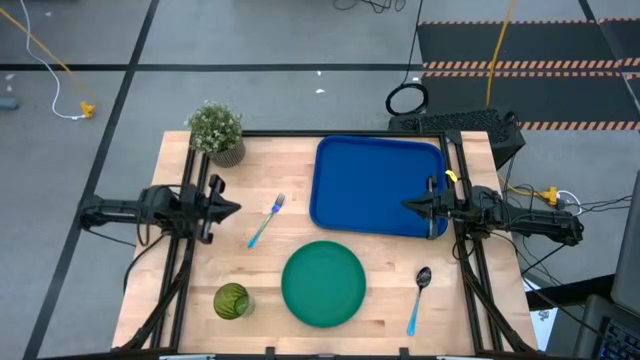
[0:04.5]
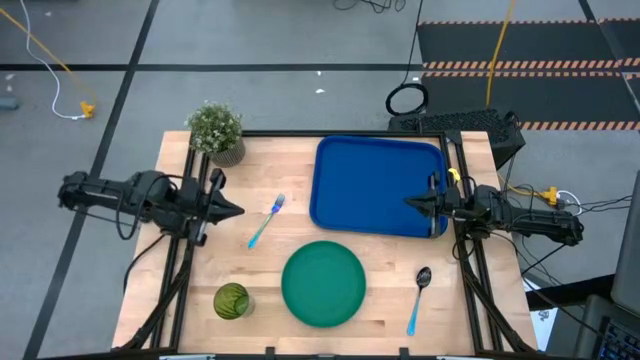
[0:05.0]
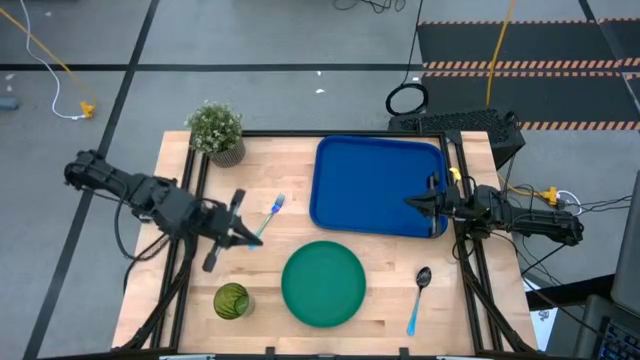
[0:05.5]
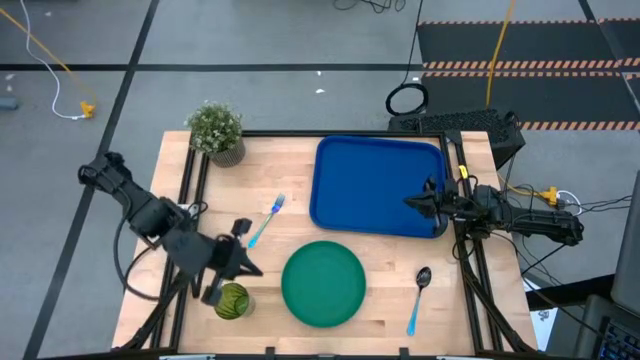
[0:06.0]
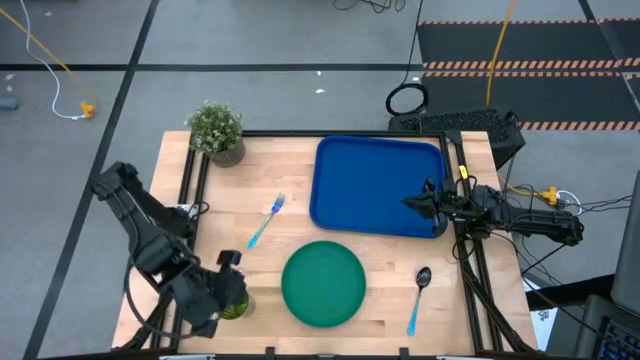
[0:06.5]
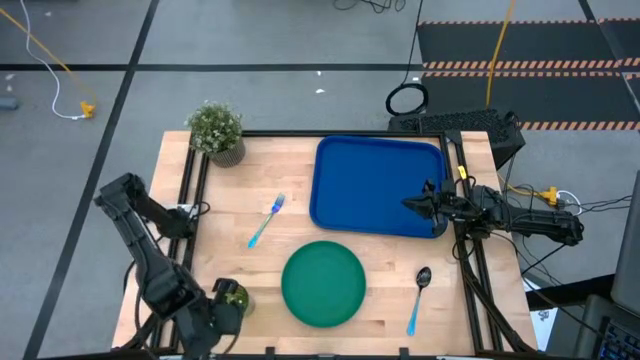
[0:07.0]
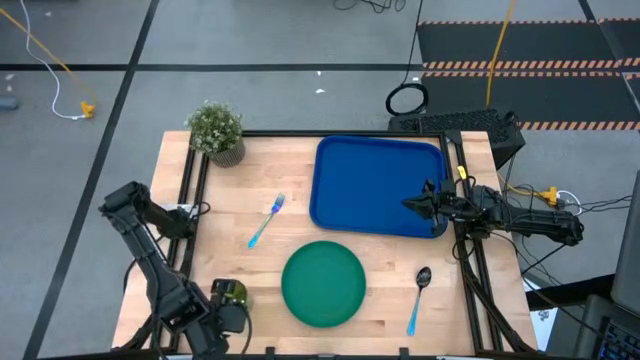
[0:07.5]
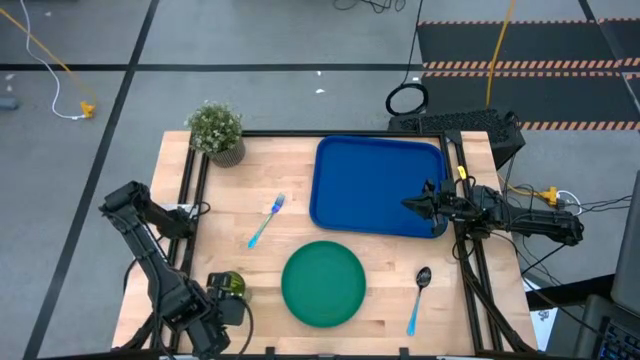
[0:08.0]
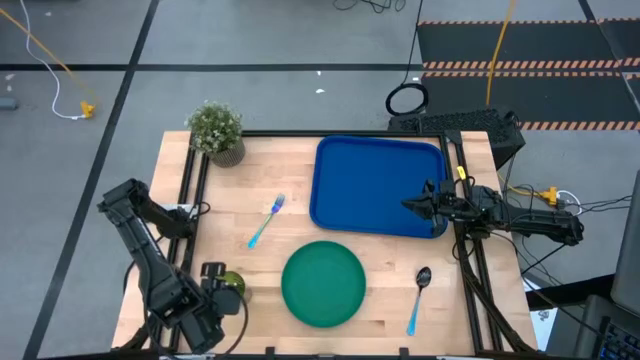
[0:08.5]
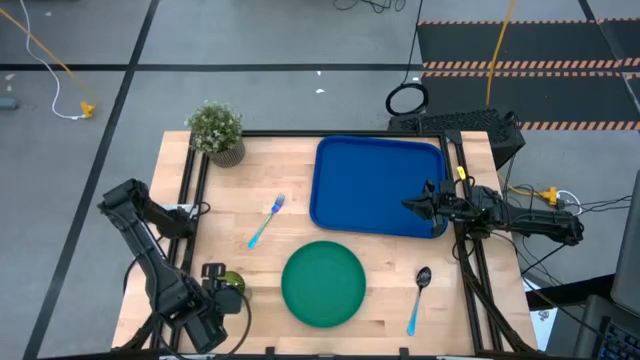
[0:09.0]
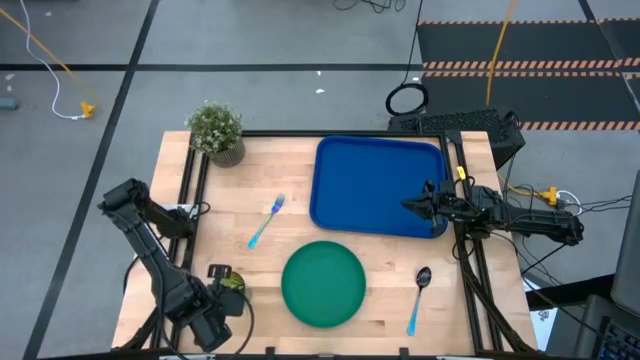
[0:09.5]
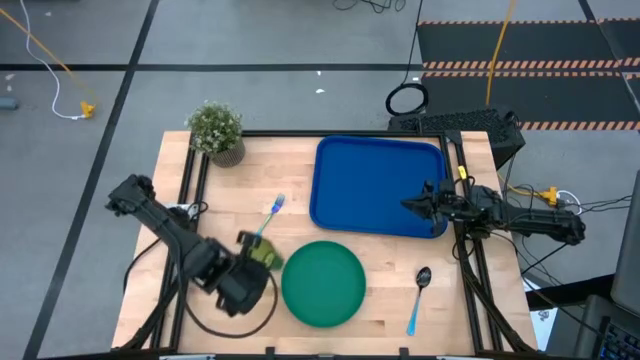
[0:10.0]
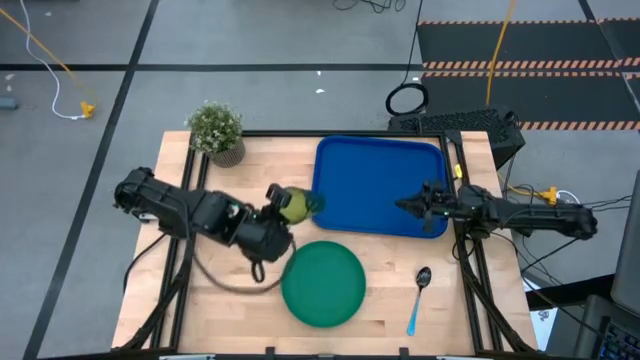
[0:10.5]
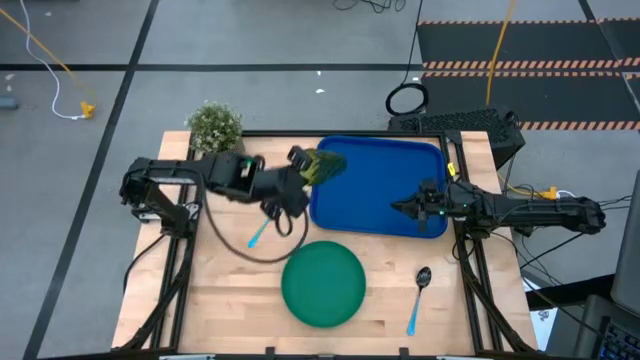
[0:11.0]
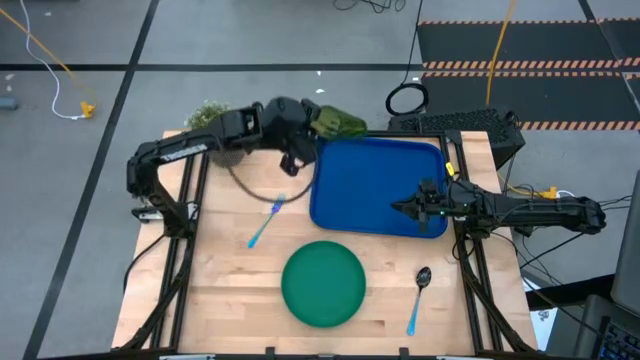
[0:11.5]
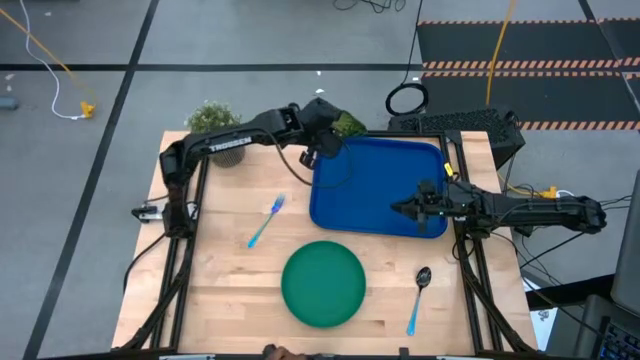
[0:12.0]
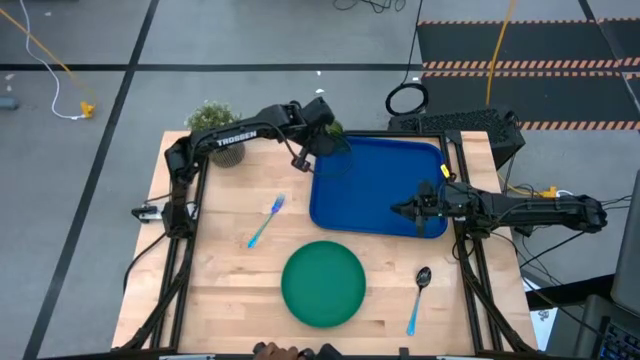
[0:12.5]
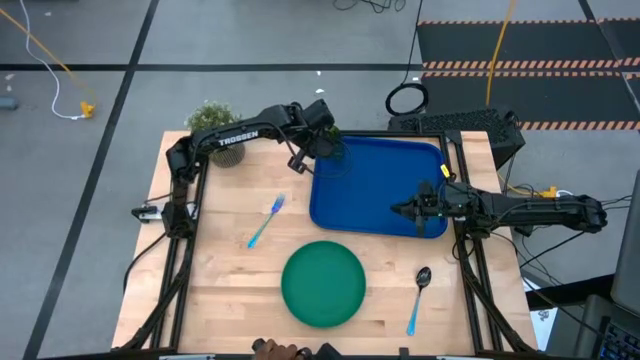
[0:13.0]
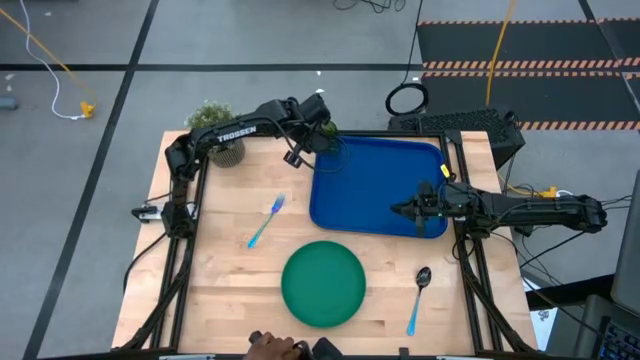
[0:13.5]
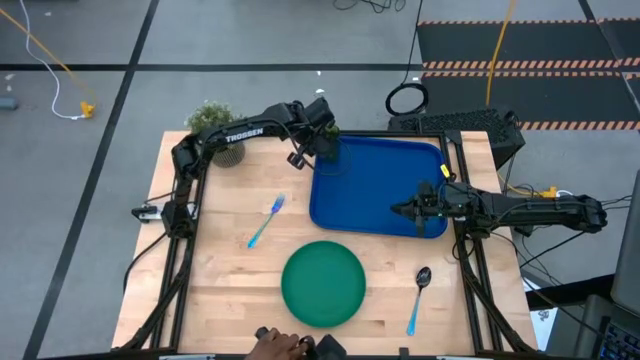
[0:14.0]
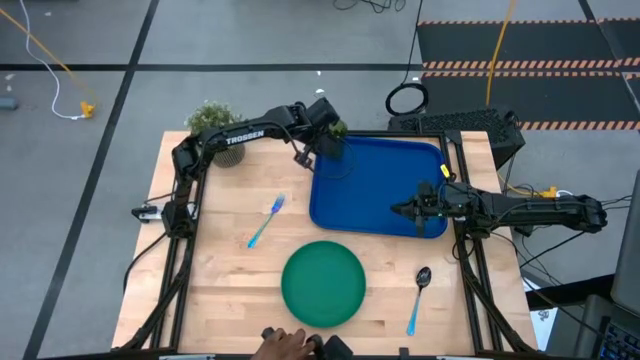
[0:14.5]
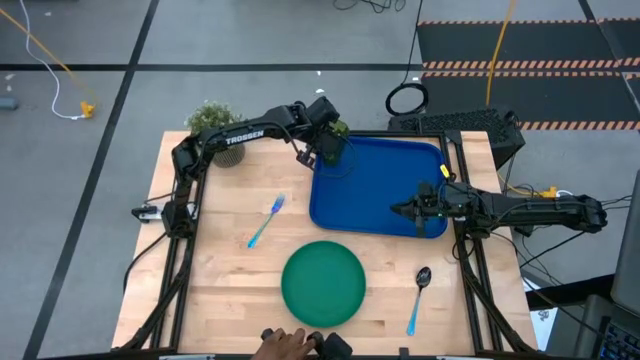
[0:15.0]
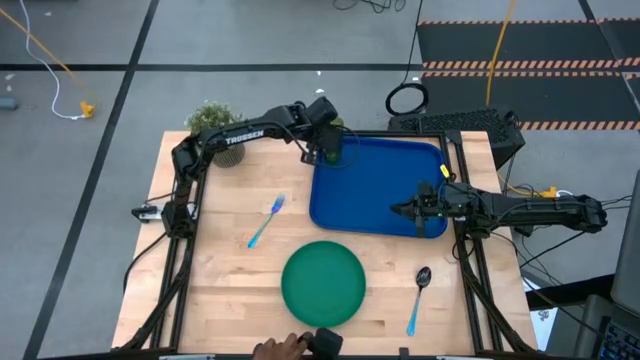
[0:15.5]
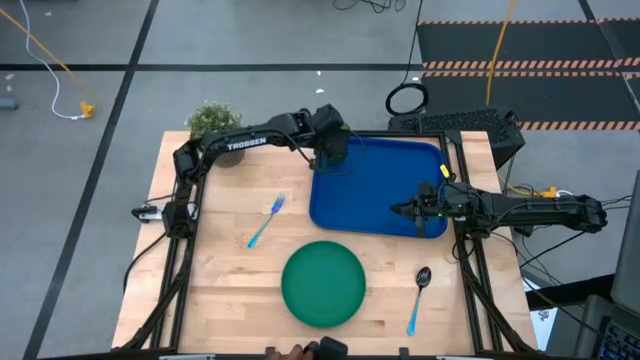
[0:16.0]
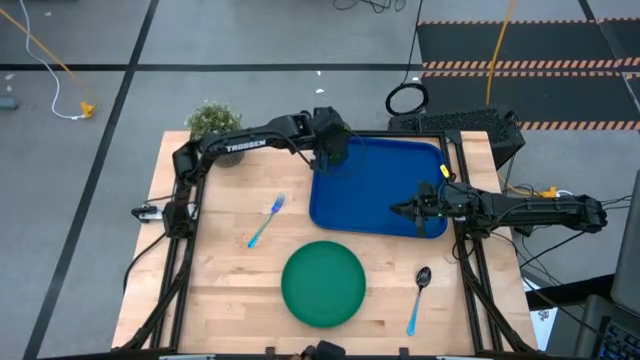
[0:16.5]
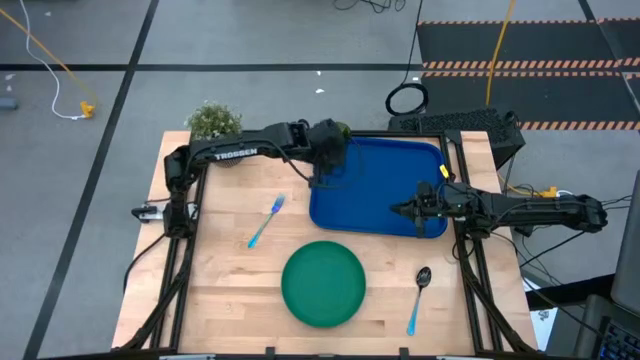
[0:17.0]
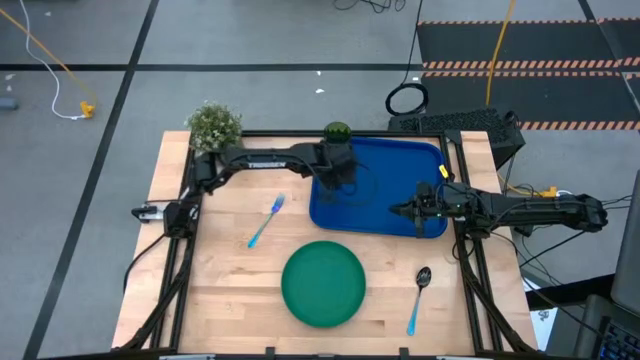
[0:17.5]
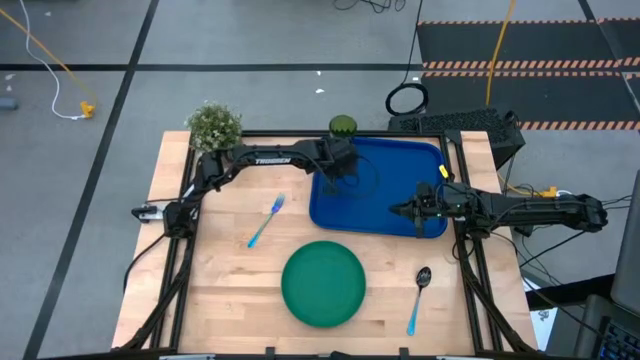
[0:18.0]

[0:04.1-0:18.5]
Task: Pick and place plate/cup/fork/spoon on tray
Put the green cup on the blue serving tray

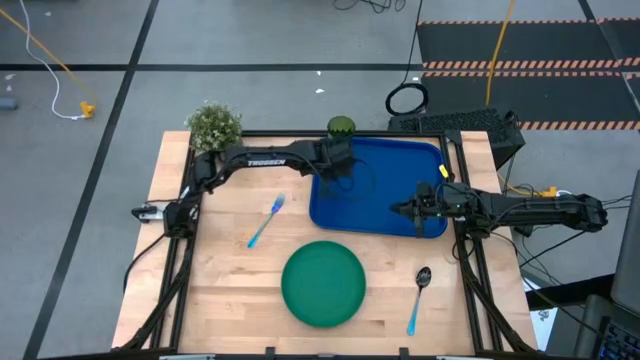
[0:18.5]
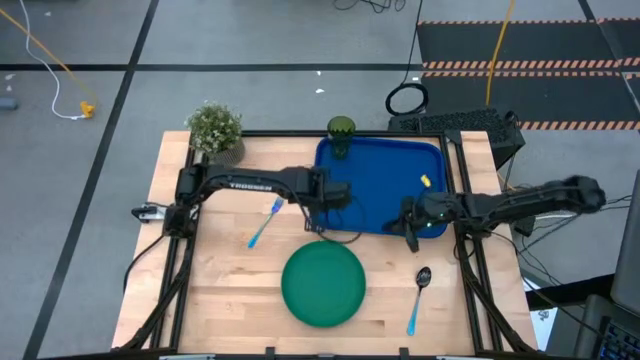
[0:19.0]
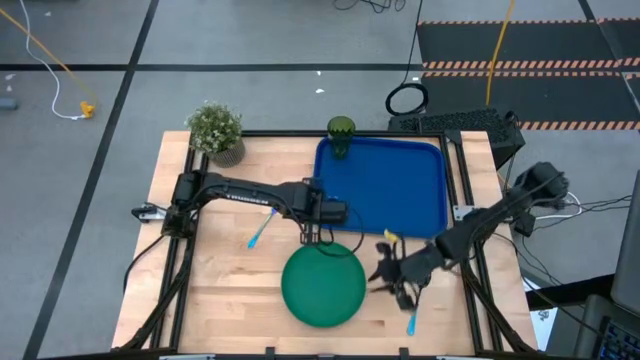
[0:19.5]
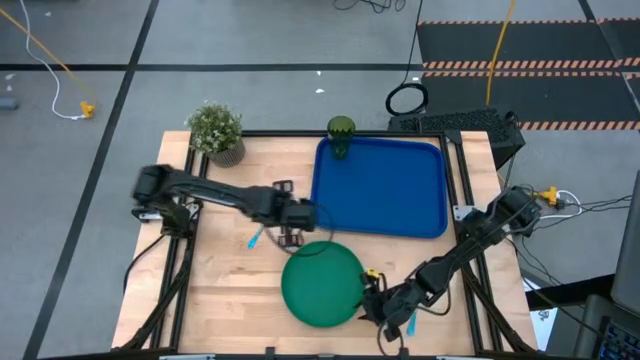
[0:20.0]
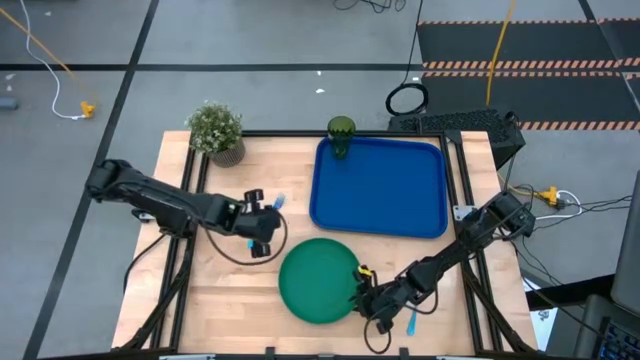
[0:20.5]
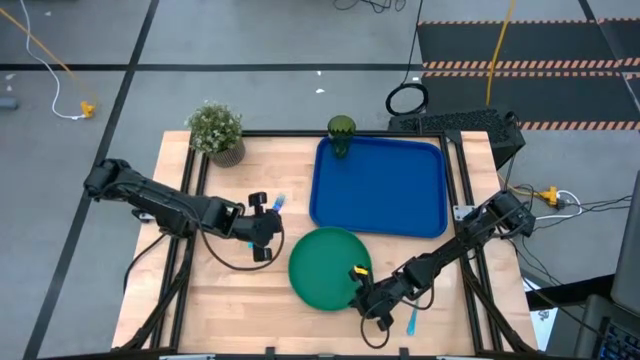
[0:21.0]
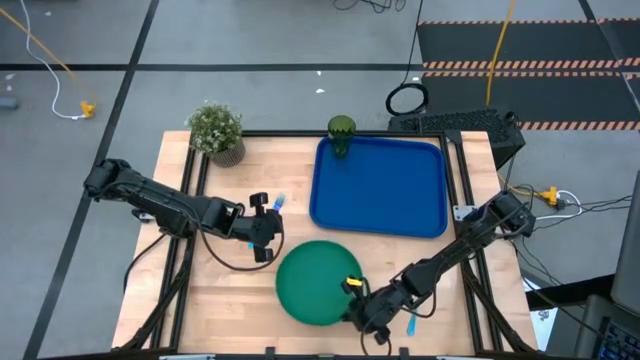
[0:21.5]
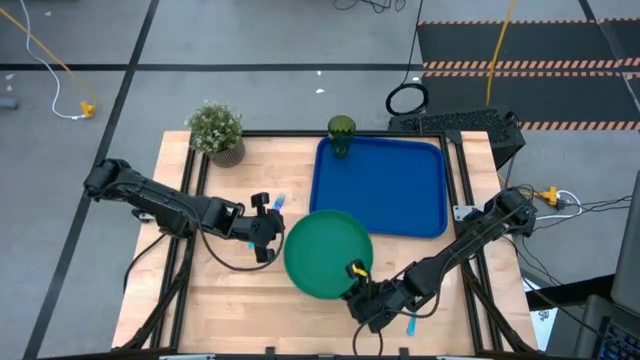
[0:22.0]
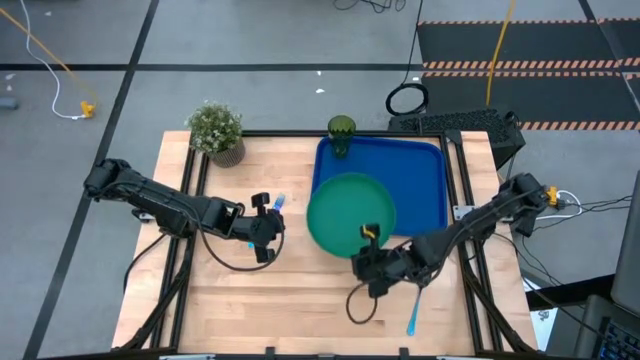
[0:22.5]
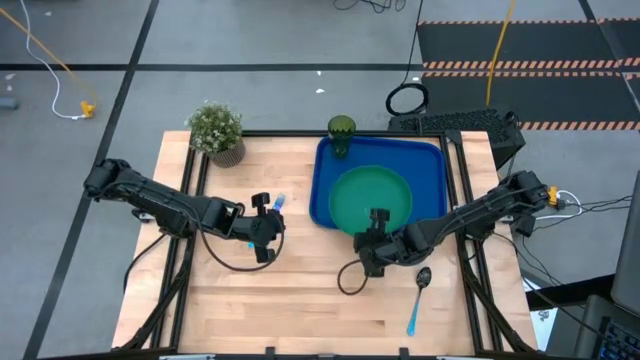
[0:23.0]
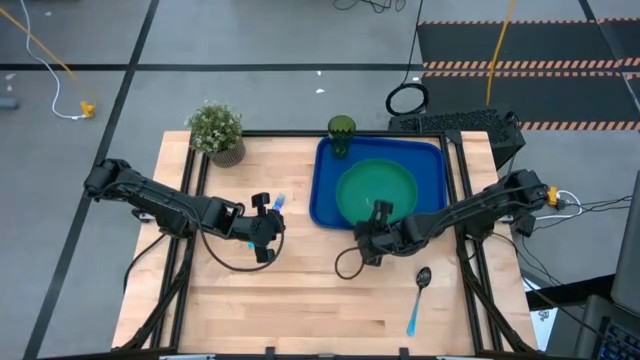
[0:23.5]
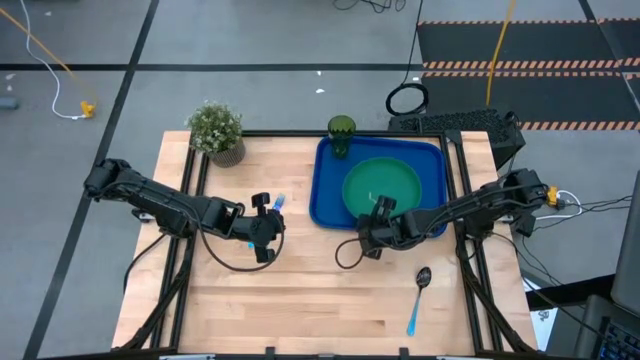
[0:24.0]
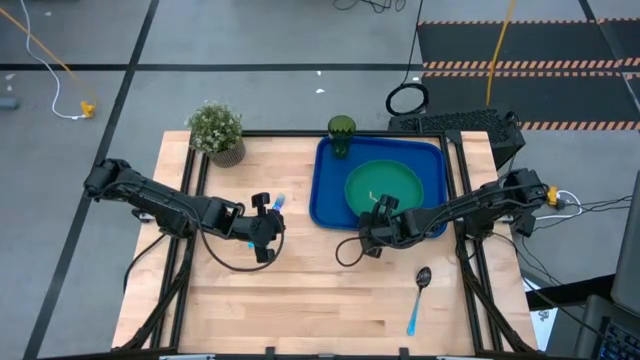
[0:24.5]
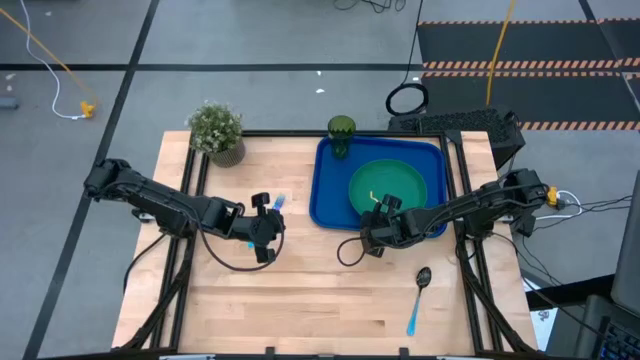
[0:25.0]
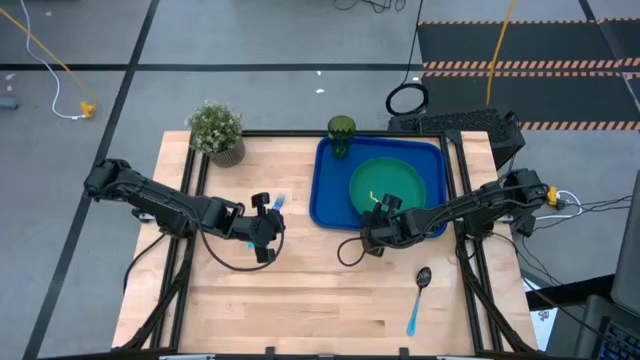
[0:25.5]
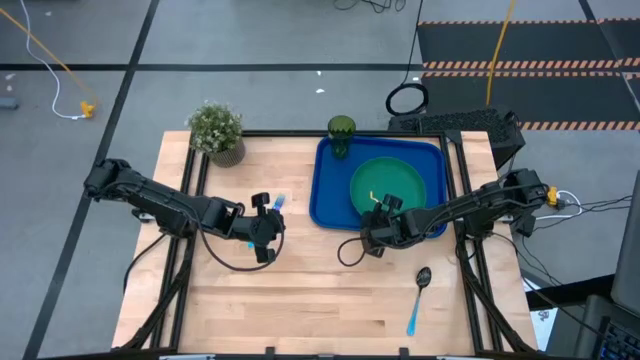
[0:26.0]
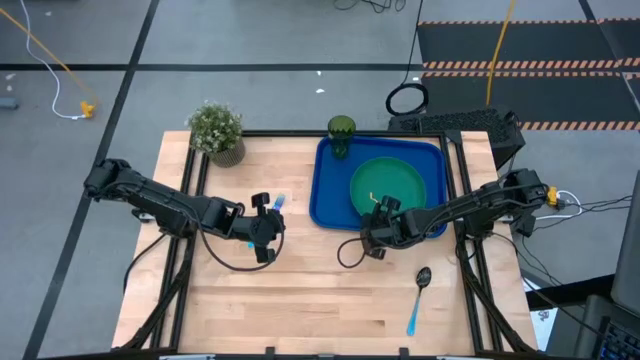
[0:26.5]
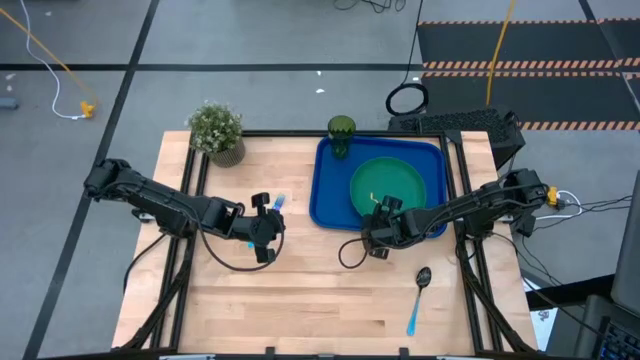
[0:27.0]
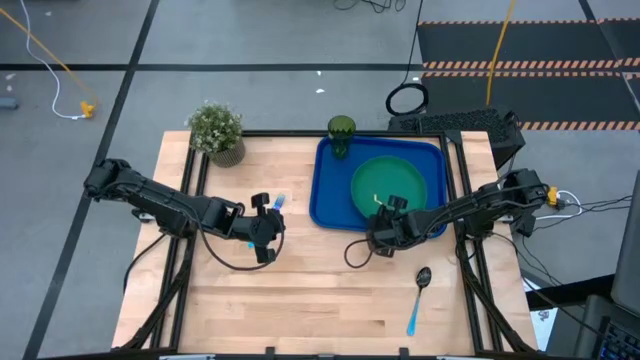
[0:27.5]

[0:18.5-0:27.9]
Put the green plate on the blue serving tray to the bottom right of the green cup
